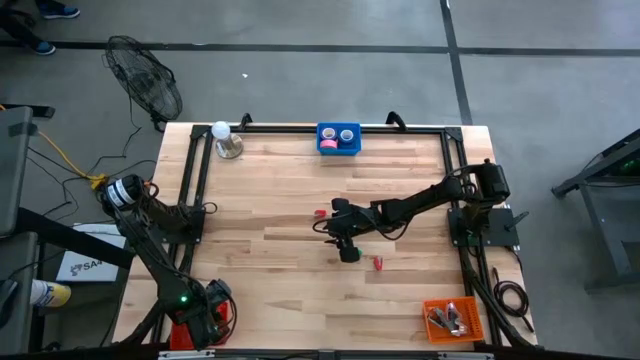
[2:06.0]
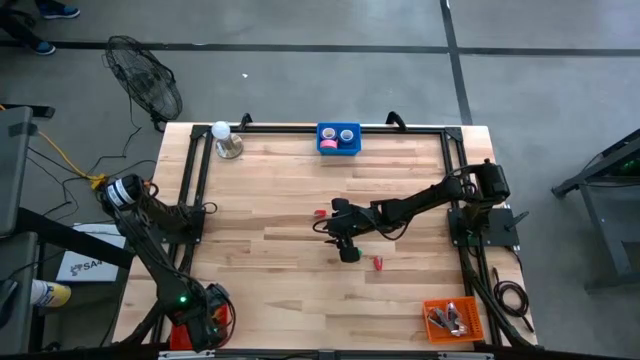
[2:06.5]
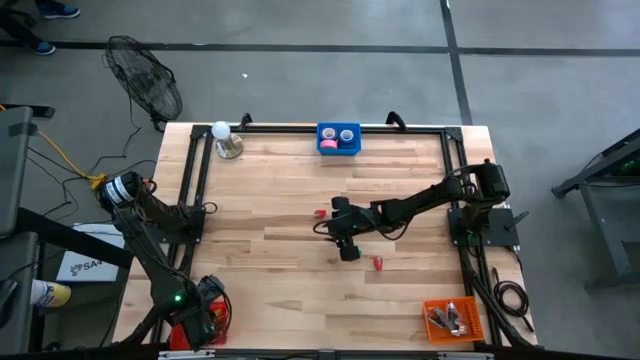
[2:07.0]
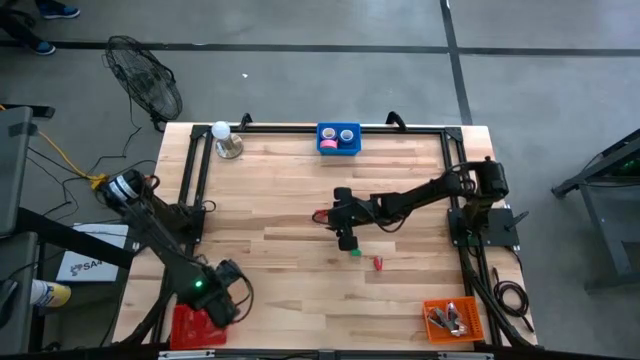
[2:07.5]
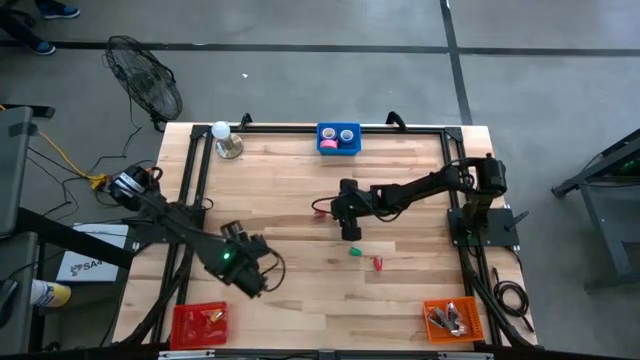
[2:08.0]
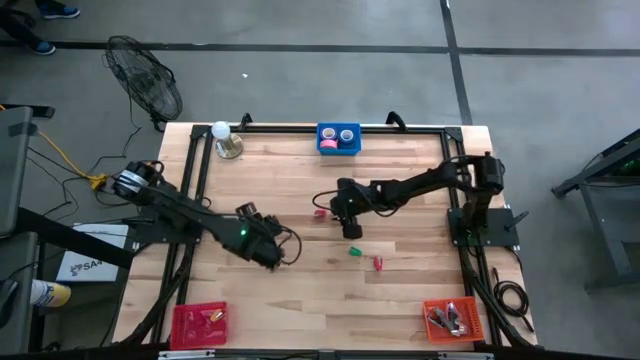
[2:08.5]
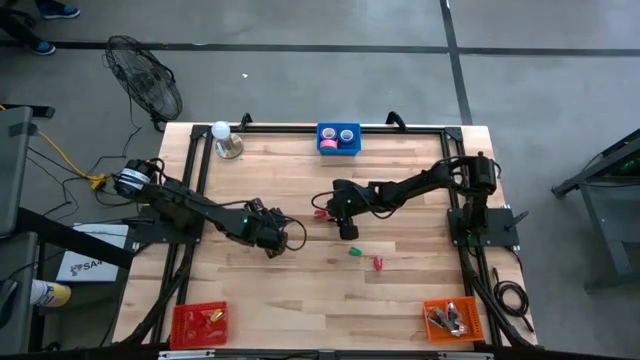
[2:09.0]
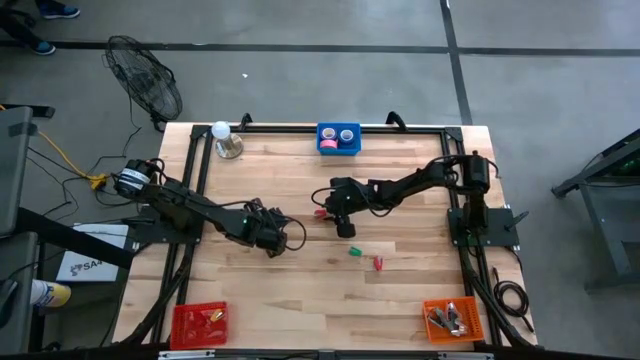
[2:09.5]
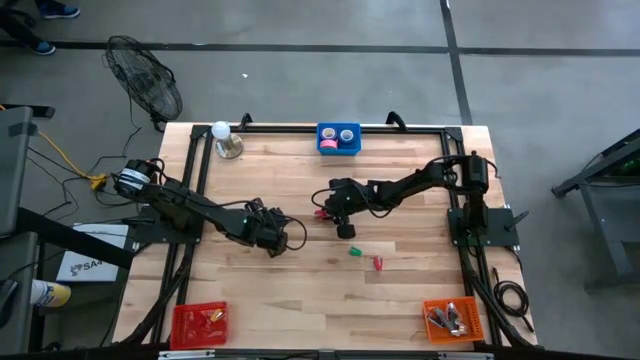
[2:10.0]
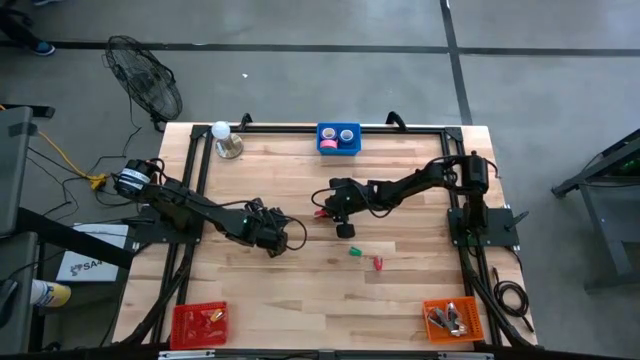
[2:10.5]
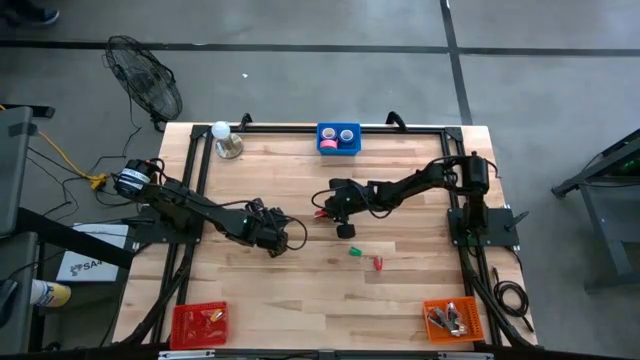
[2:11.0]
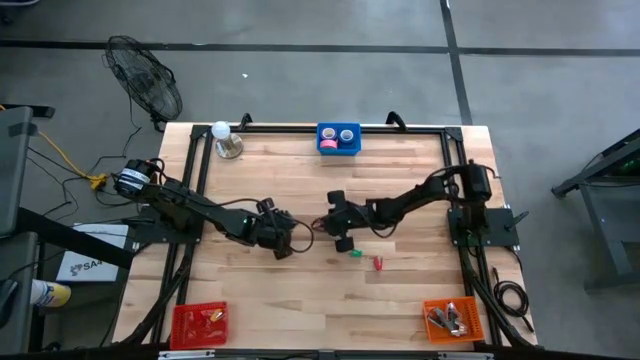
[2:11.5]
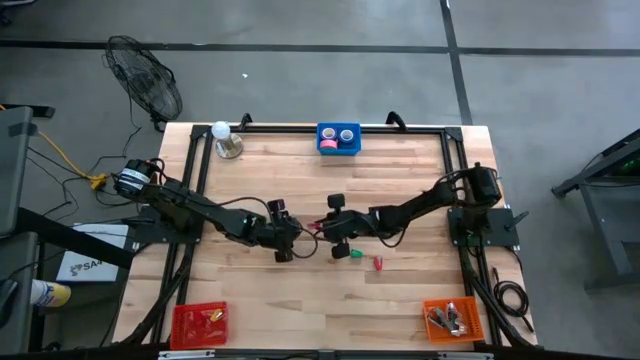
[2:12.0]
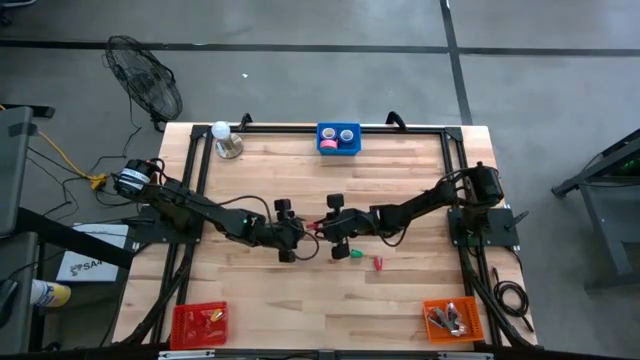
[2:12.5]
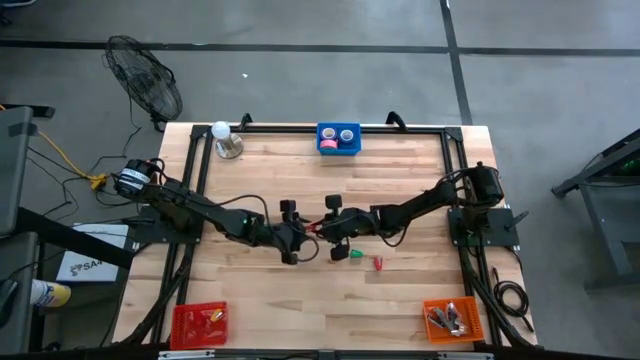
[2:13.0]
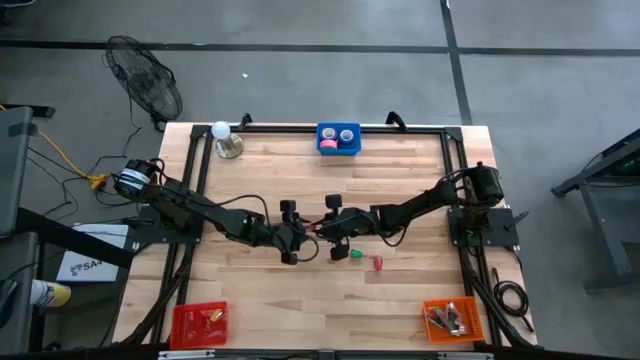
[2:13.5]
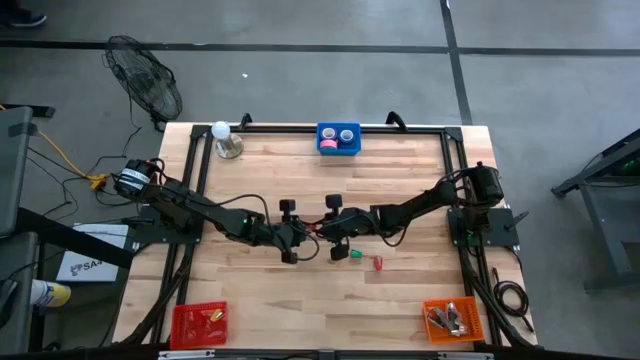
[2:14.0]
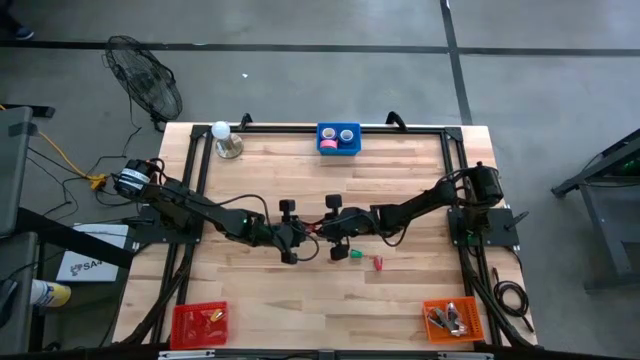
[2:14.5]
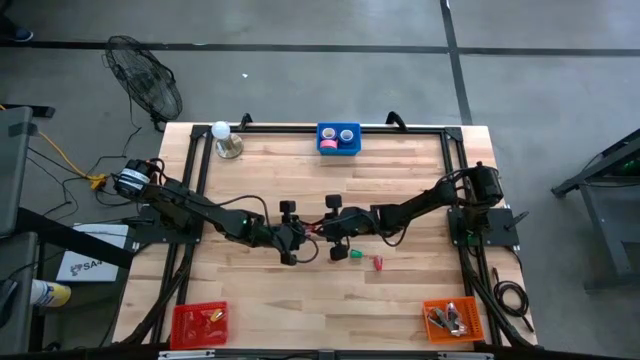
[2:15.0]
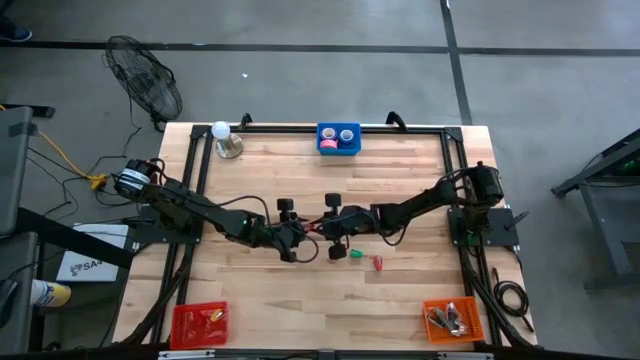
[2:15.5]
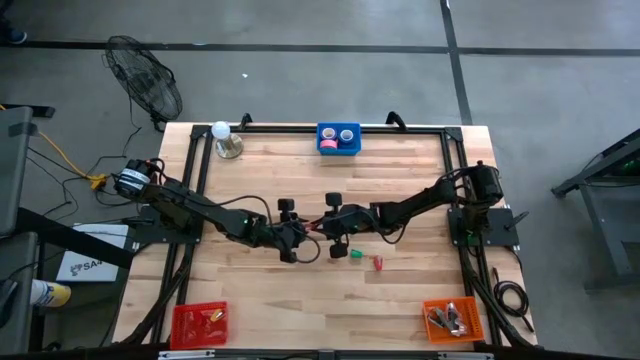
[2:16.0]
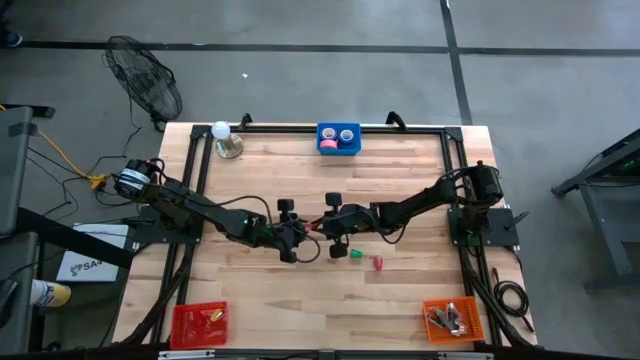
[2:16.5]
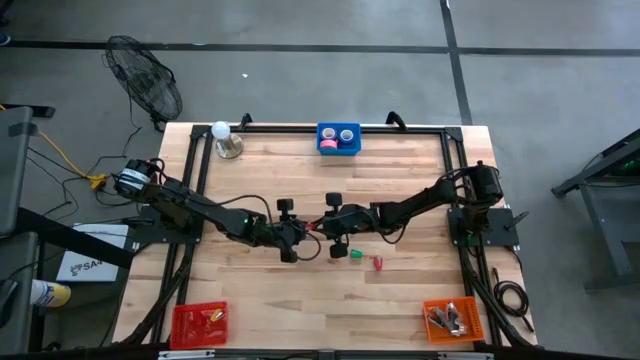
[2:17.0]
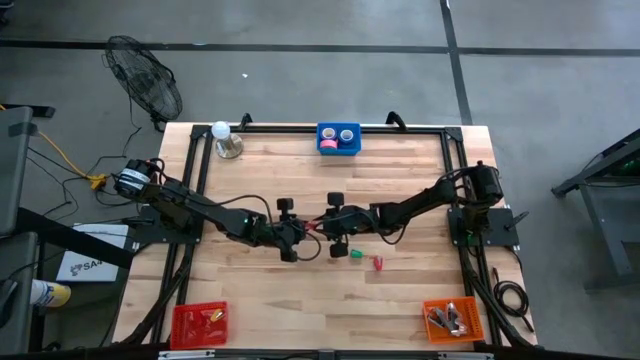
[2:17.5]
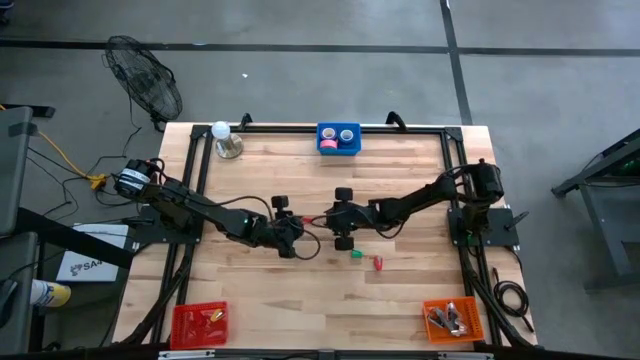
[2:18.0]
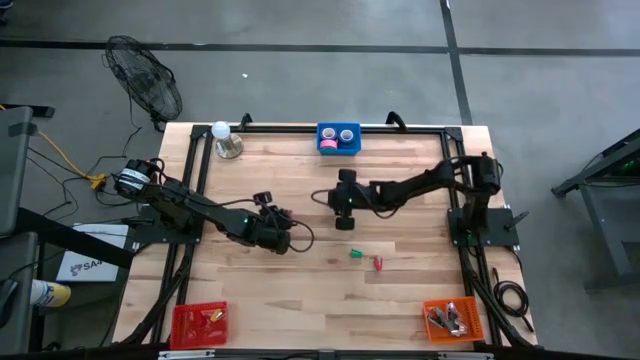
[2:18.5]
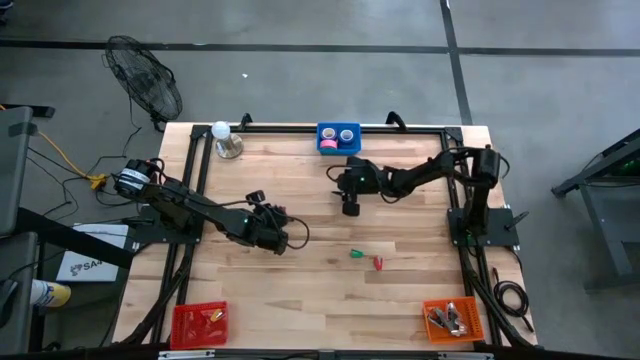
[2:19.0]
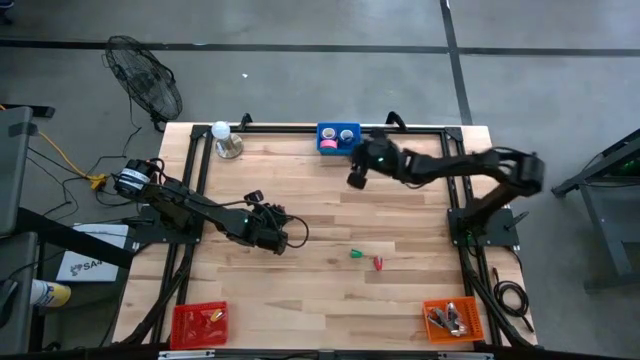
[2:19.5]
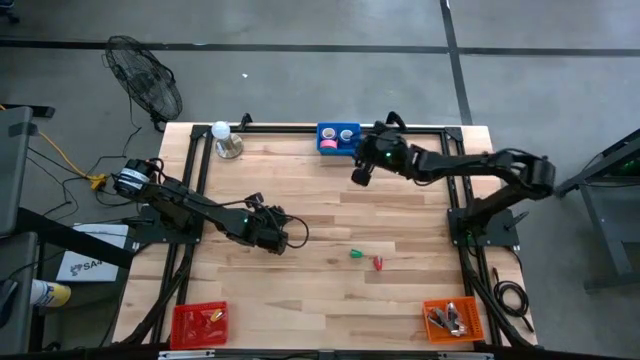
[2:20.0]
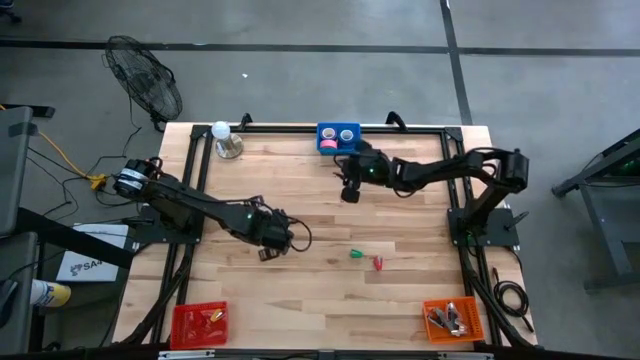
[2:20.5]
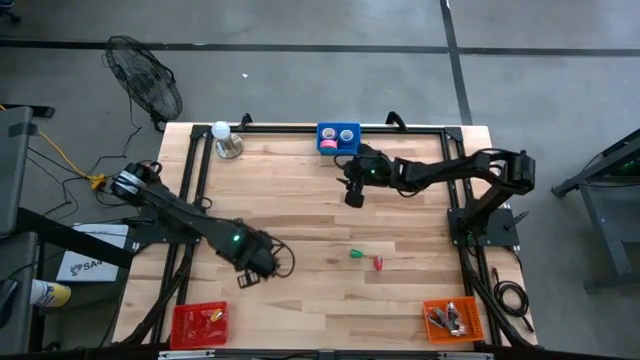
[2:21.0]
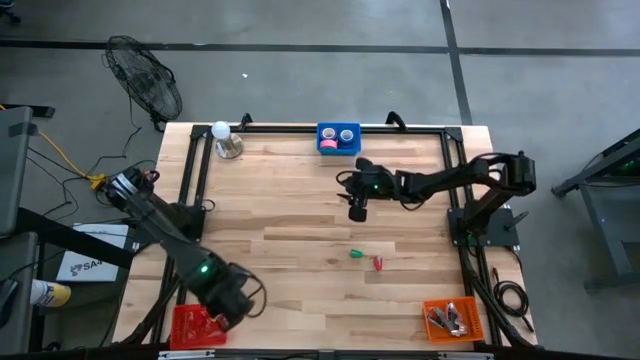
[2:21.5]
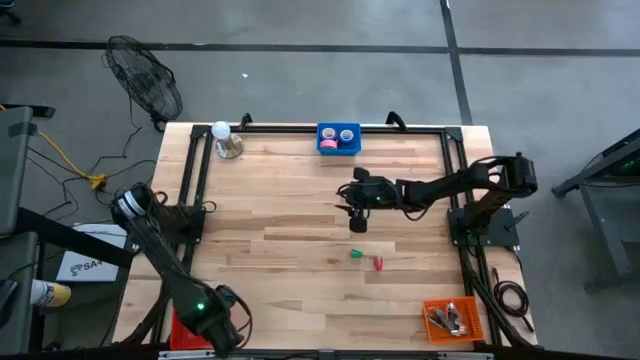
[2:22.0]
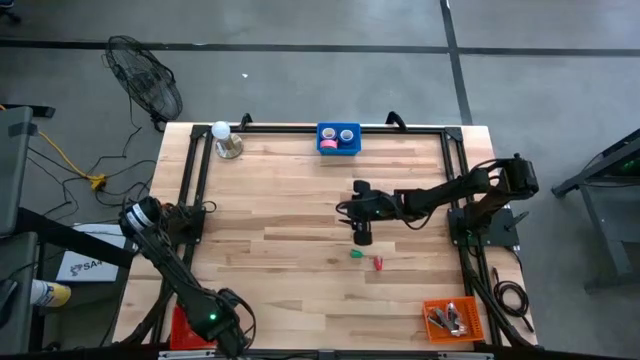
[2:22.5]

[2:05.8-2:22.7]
Task: Pick and place Stapler, Stapler remover, tape
Put the top red stapler into the red bin

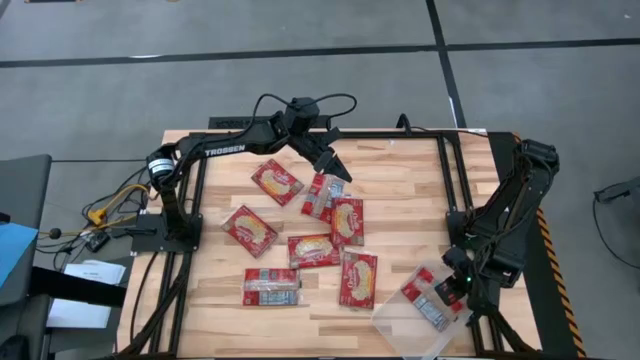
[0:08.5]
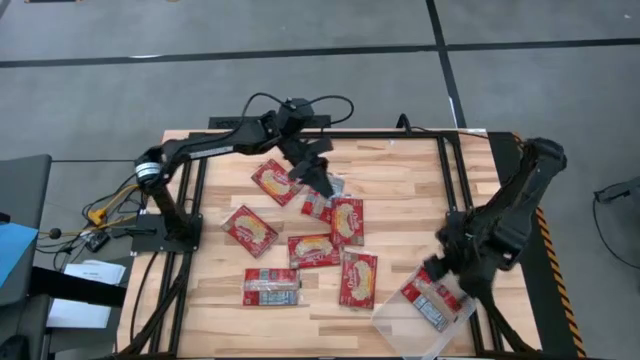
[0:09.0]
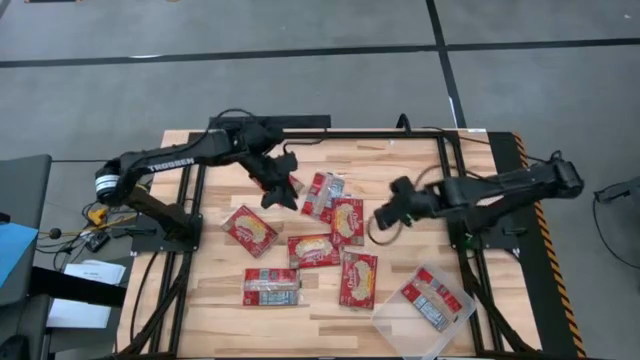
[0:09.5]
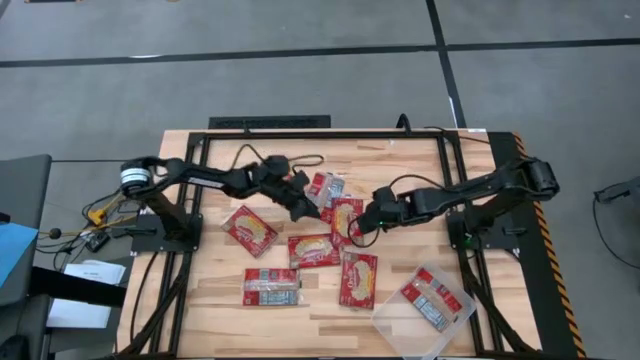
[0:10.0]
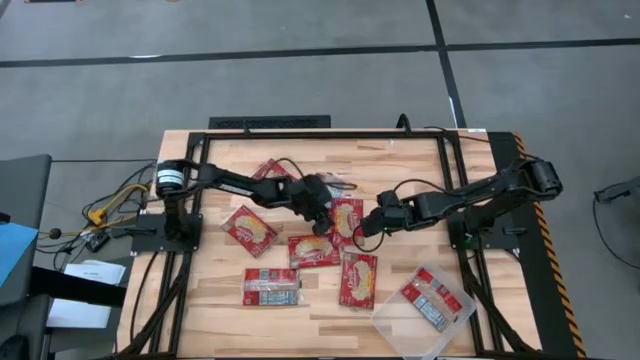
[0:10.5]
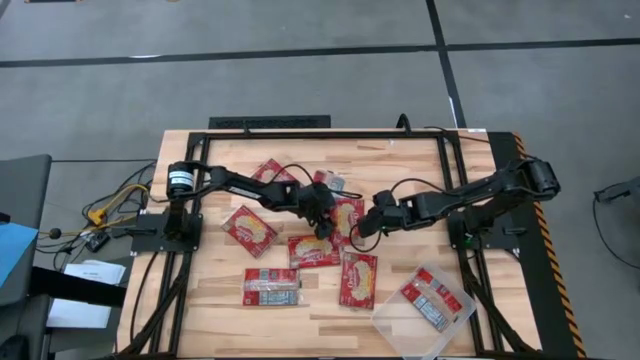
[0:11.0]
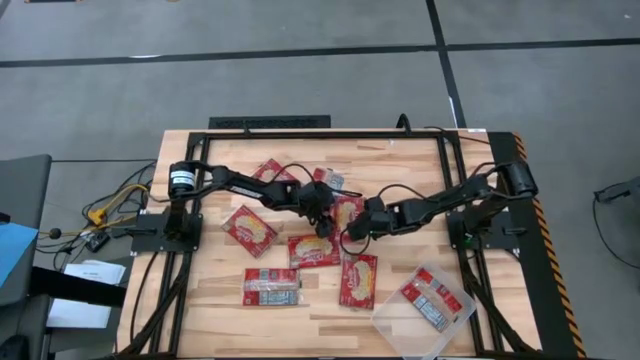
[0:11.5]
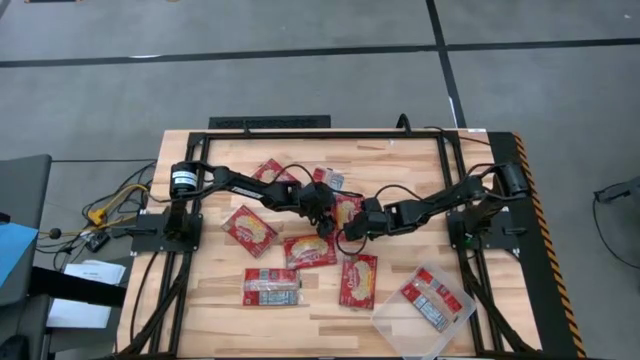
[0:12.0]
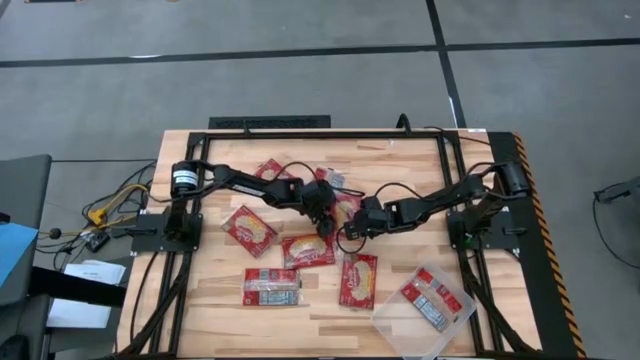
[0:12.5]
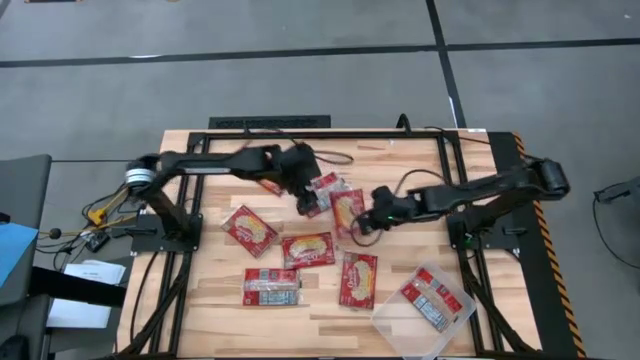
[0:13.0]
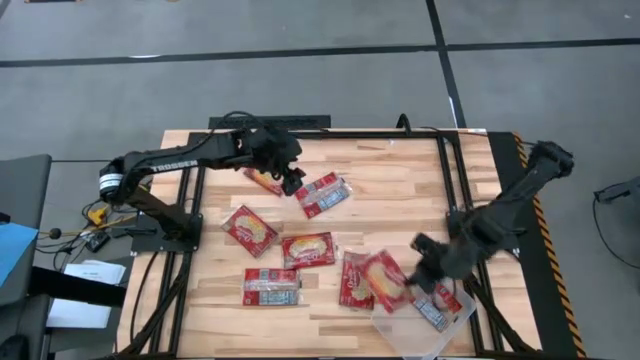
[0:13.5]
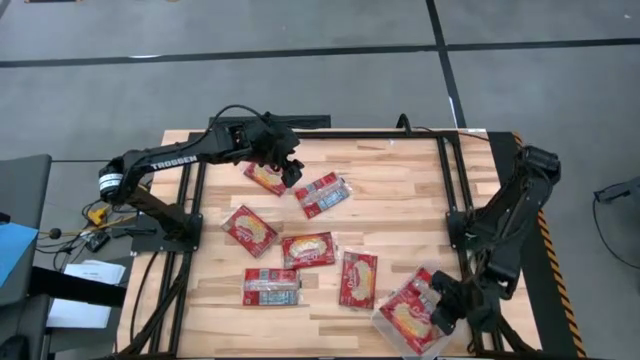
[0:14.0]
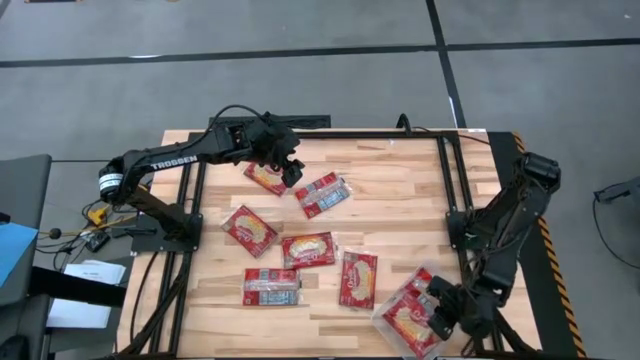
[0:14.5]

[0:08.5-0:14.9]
Task: Sort popcorn bags into baskets
Put the red popcorn bag into the transparent bin
